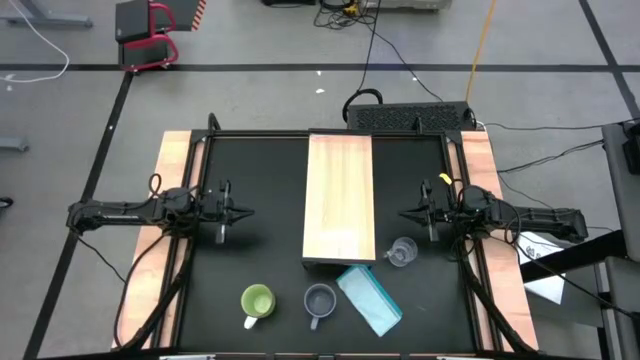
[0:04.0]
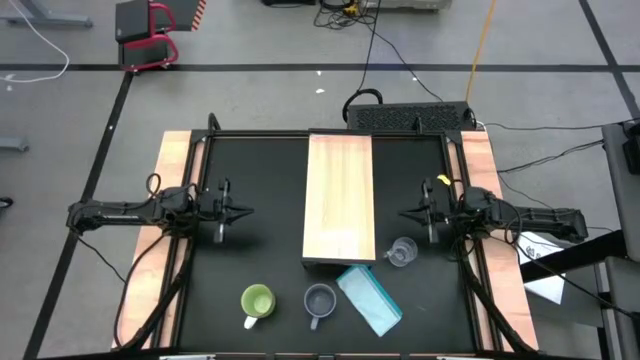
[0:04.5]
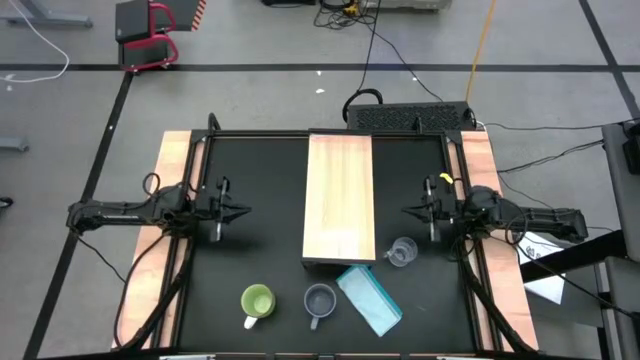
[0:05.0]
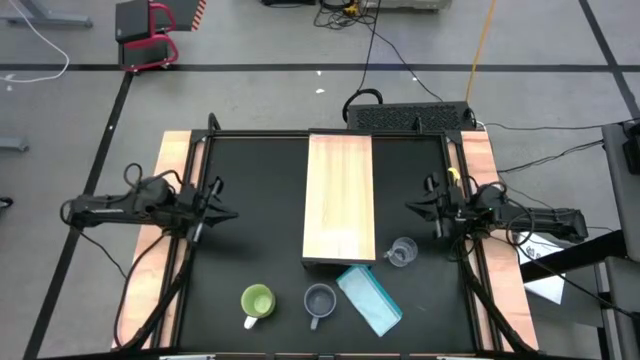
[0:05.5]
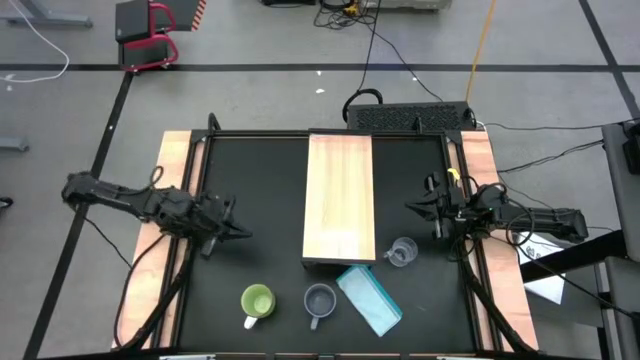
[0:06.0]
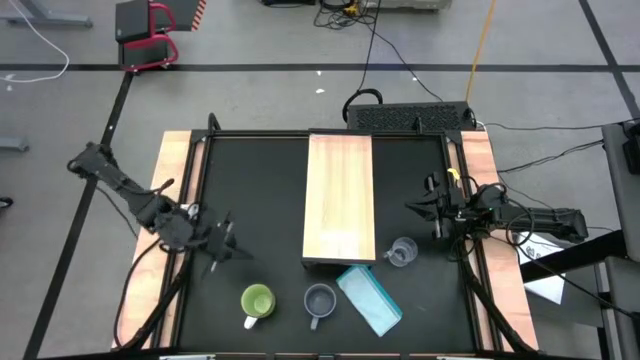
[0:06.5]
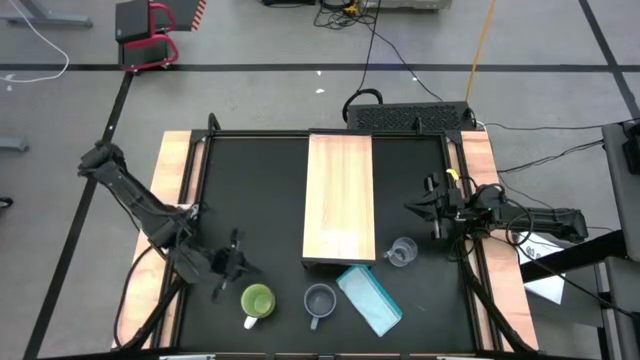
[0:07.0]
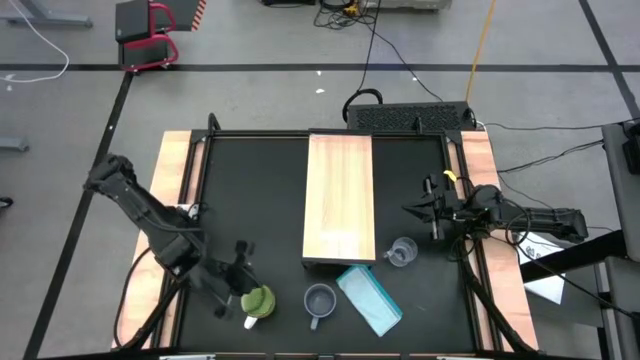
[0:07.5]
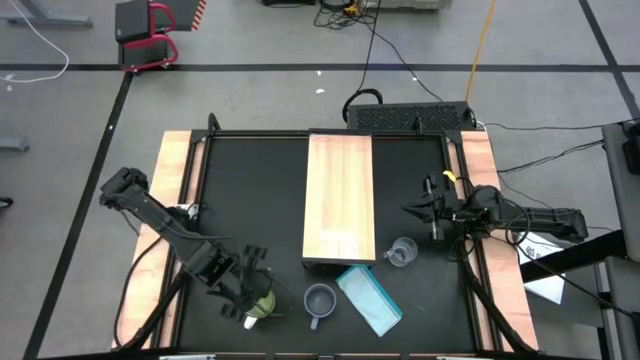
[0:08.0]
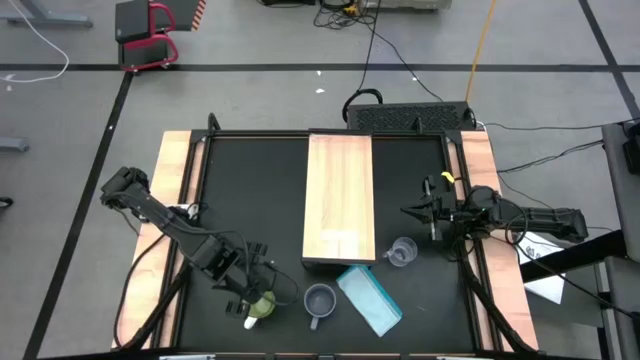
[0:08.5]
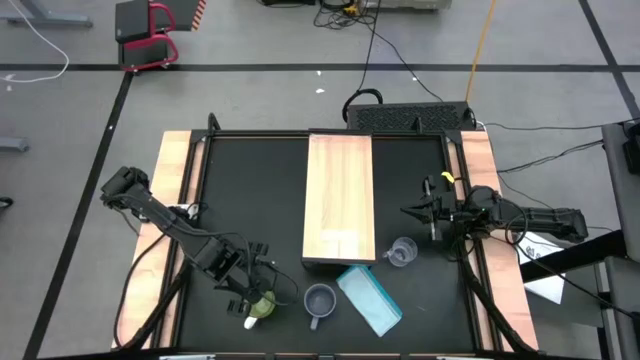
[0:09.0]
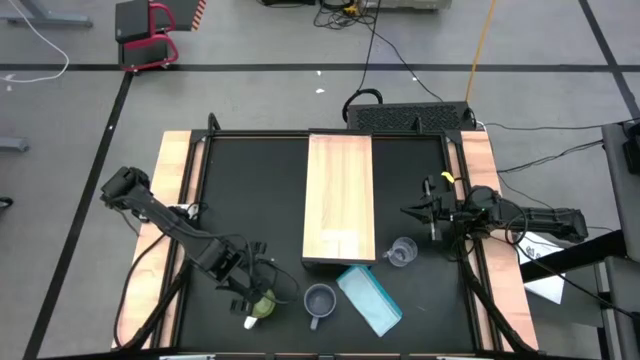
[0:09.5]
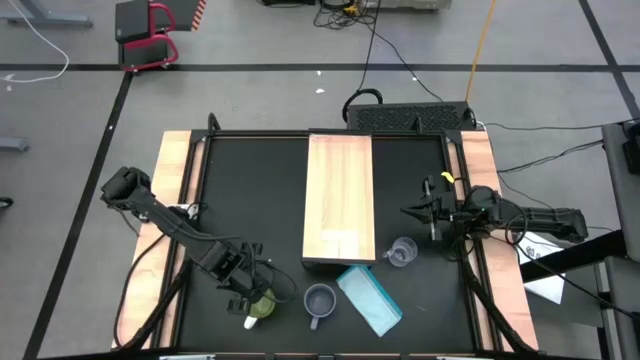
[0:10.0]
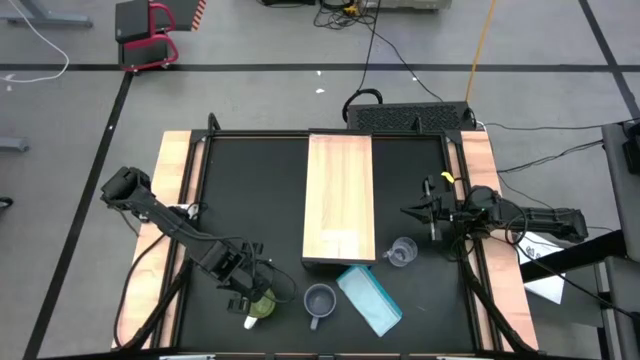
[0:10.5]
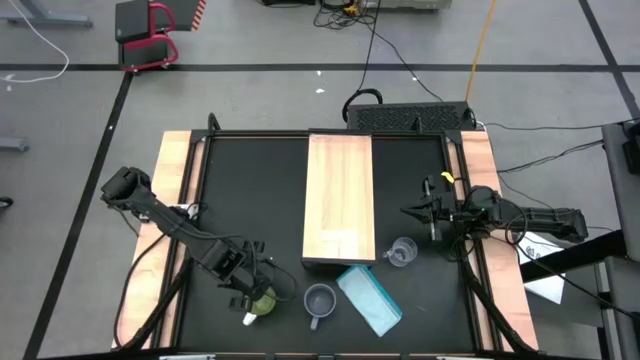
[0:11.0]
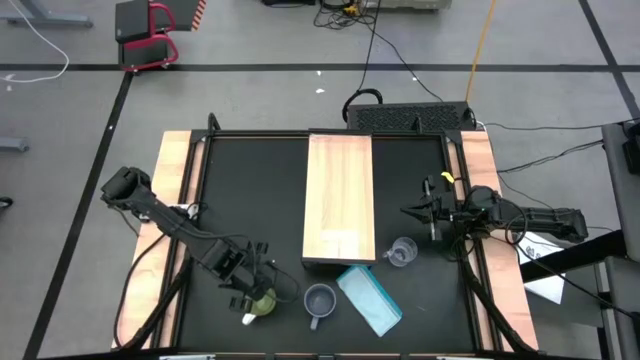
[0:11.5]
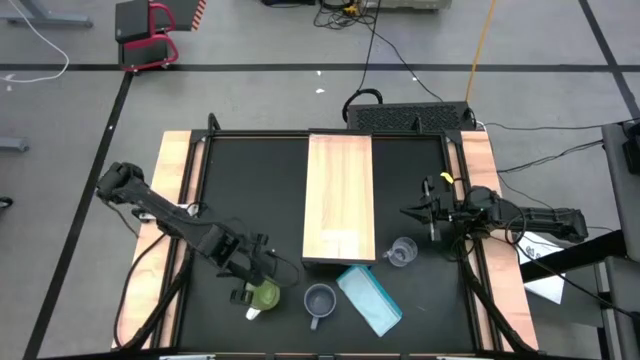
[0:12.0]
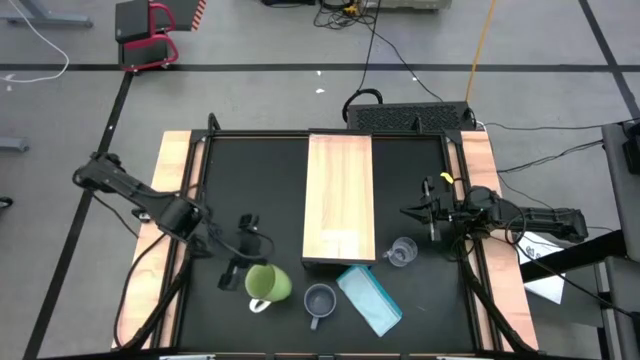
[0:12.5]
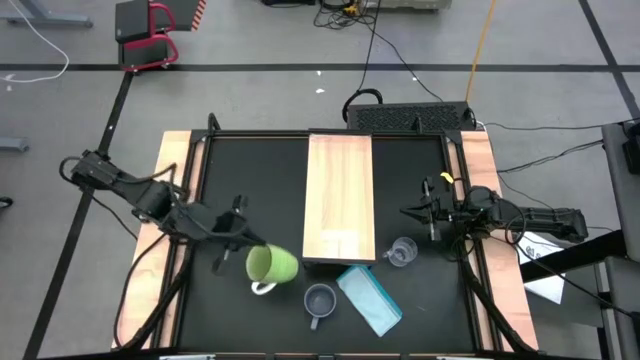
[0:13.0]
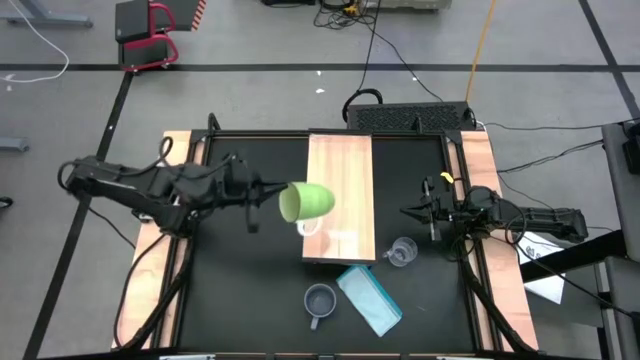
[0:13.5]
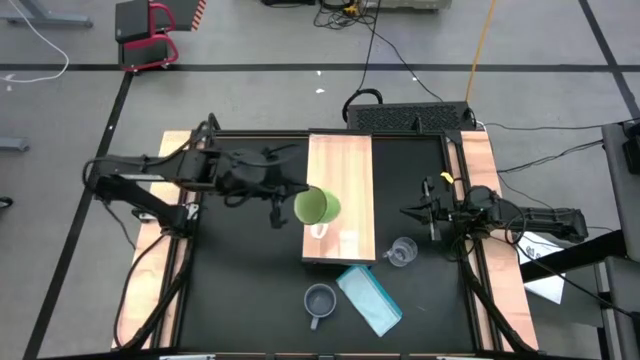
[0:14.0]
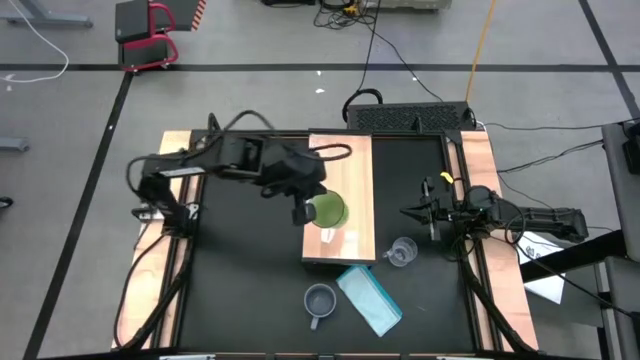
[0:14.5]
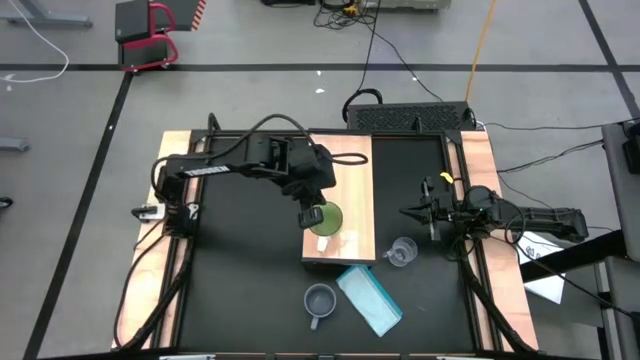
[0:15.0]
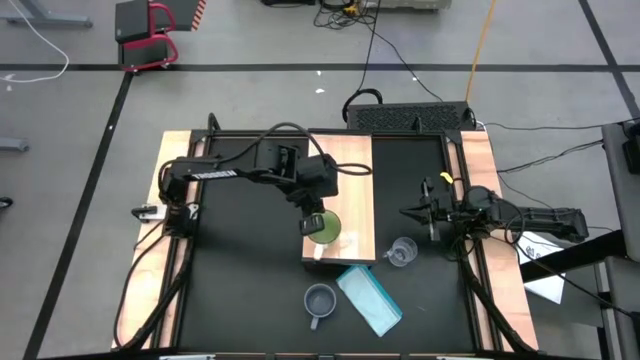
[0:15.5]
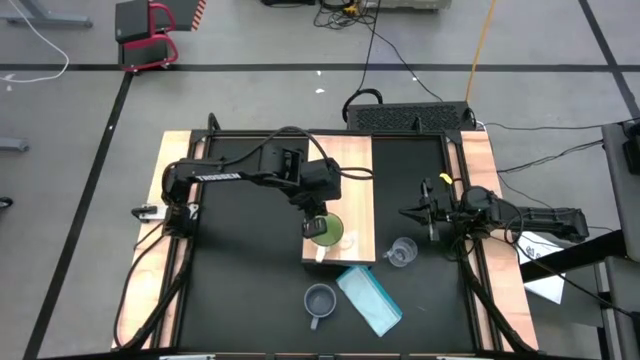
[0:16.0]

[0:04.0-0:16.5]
Task: Stack small to large cups/mugs on shelf
Put the green mug on the shelf

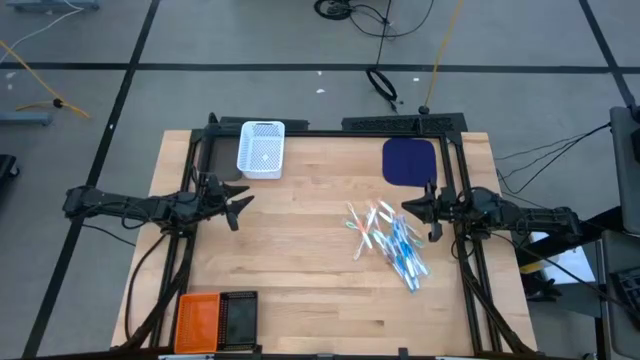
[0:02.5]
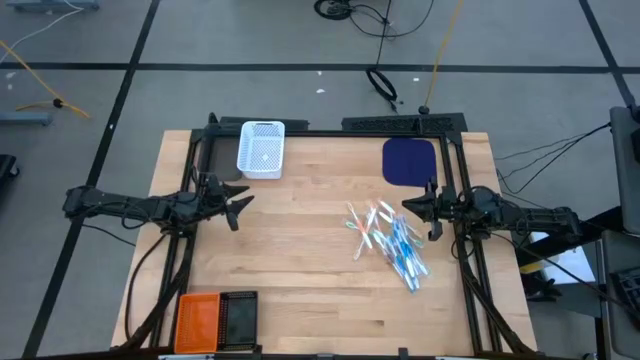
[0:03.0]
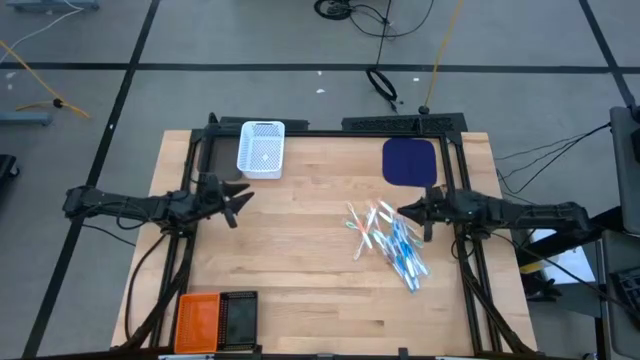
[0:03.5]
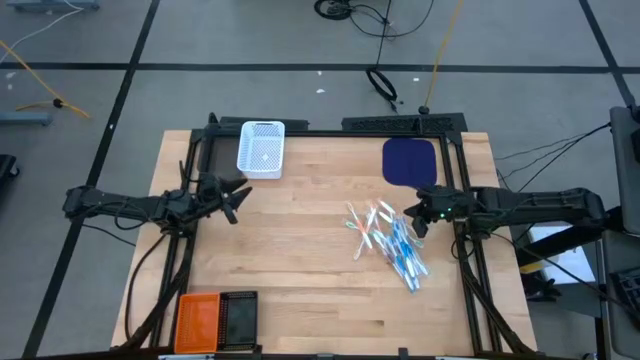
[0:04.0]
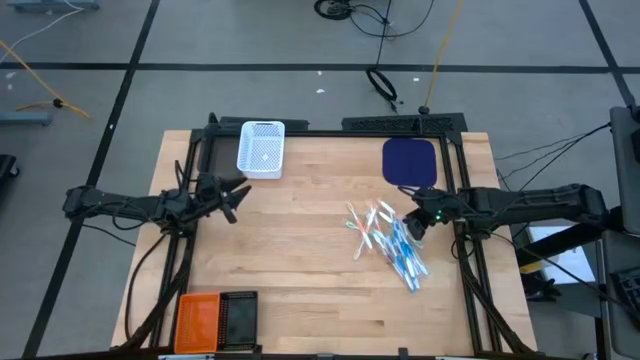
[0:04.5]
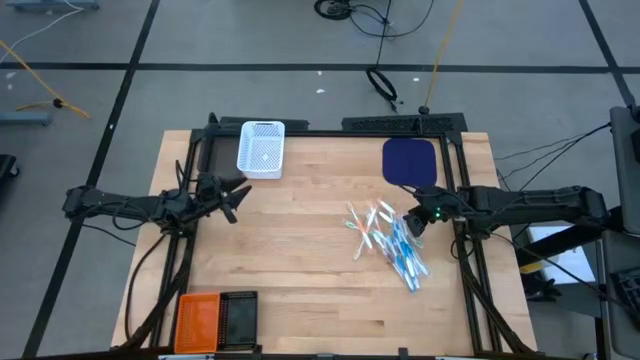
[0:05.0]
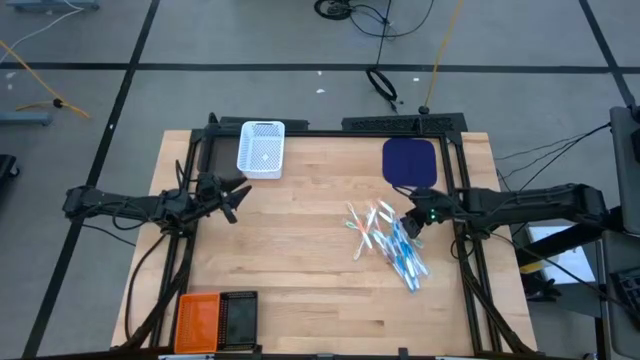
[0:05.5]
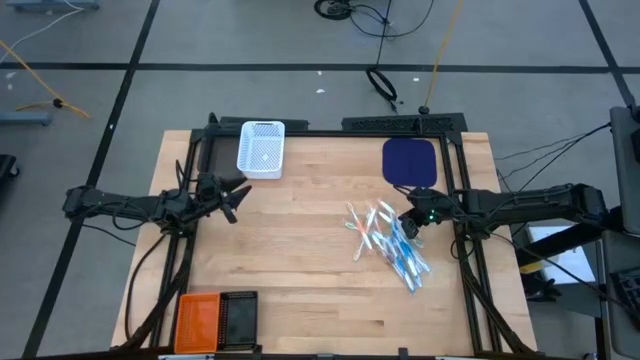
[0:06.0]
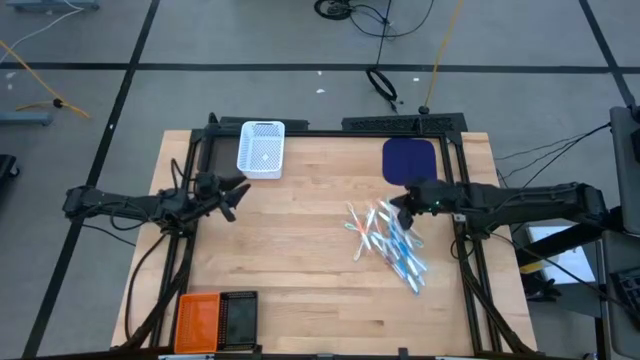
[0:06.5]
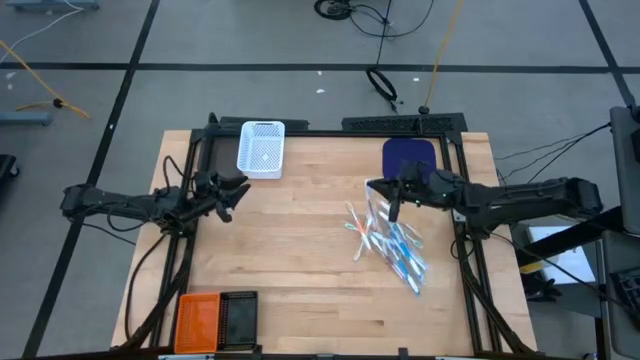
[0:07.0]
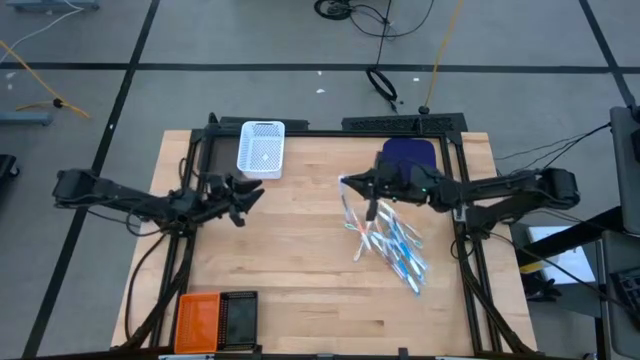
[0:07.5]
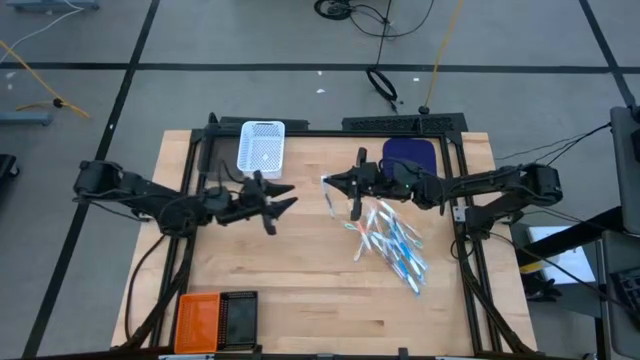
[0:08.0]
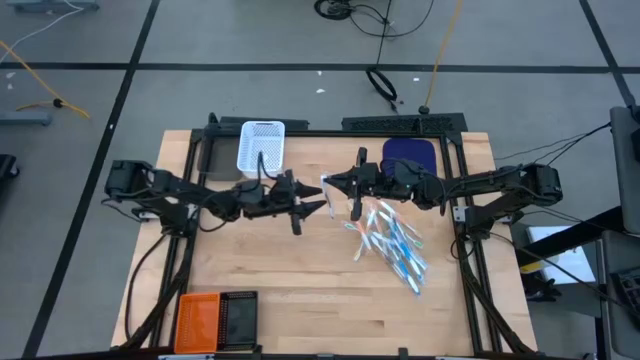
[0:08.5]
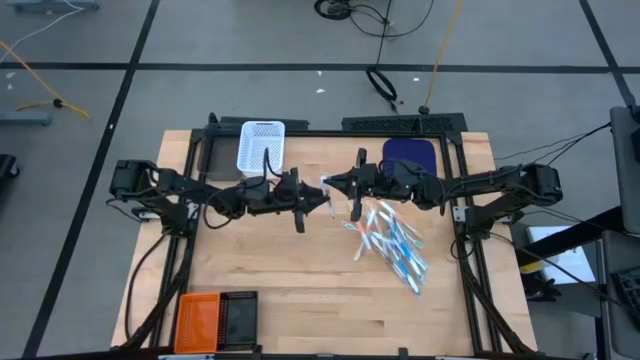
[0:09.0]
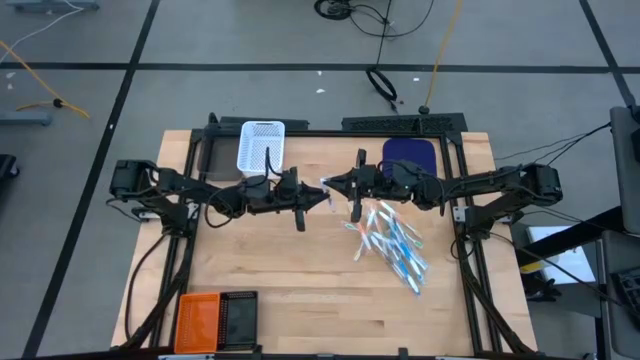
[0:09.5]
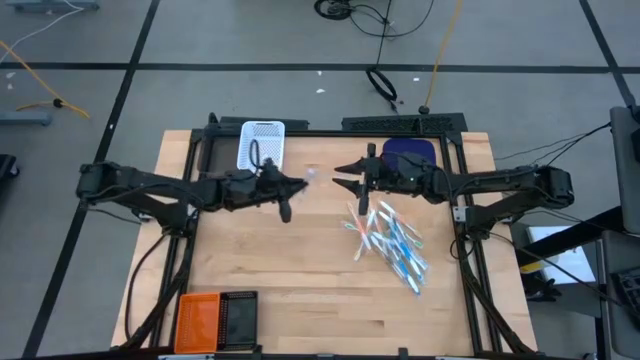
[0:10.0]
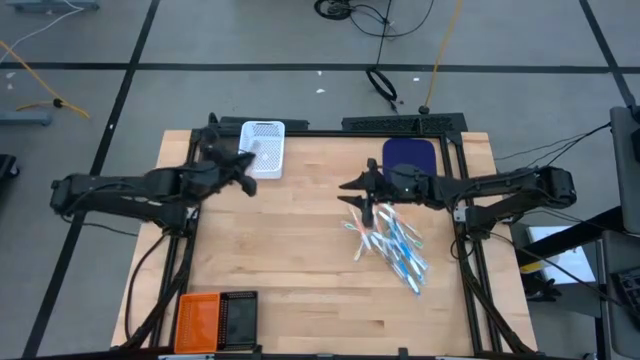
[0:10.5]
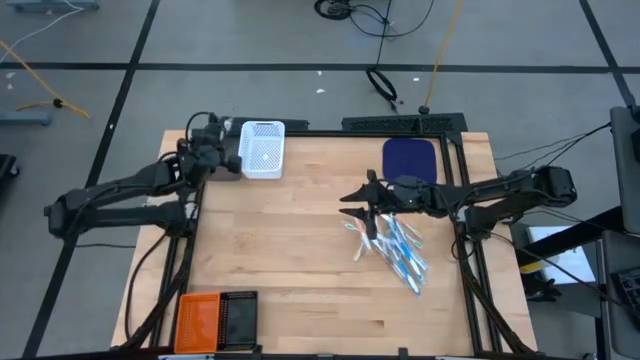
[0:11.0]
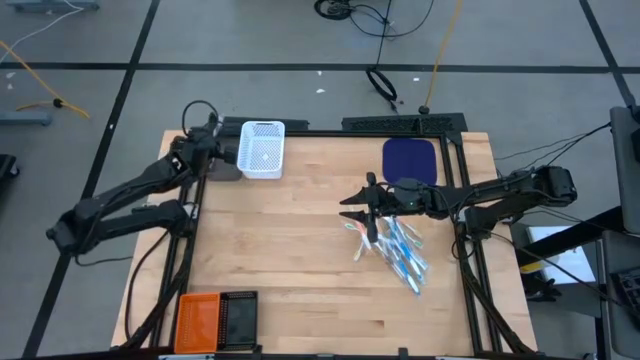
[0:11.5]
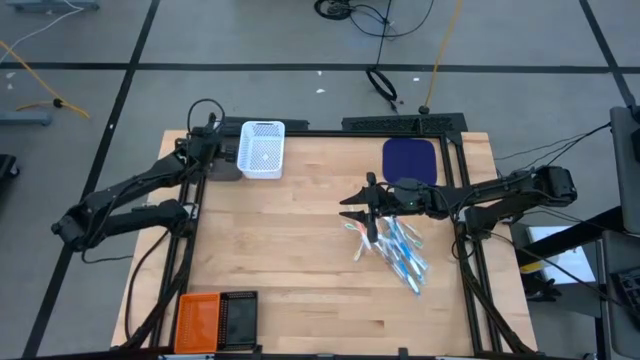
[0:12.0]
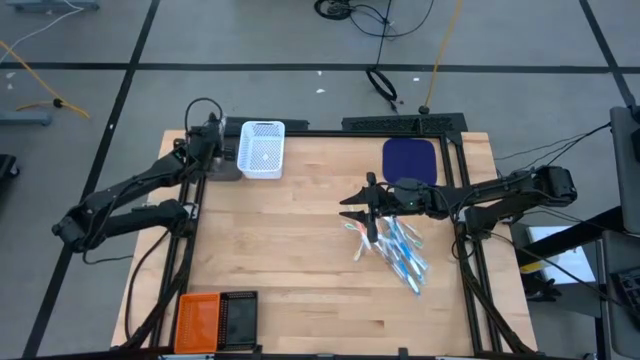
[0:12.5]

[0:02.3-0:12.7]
Task: Pick & Place Toothbrushes
Put the violet toothbrush into the gray bin
